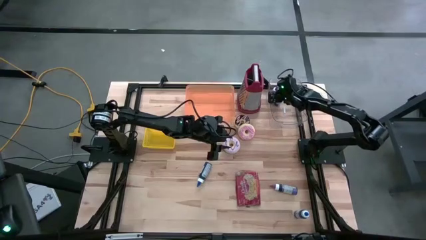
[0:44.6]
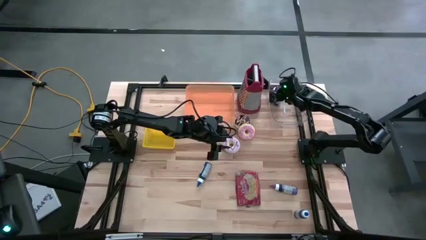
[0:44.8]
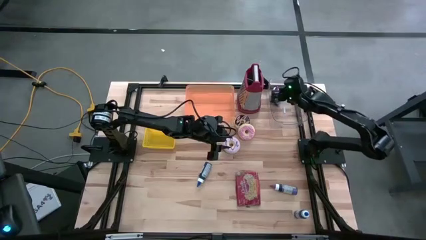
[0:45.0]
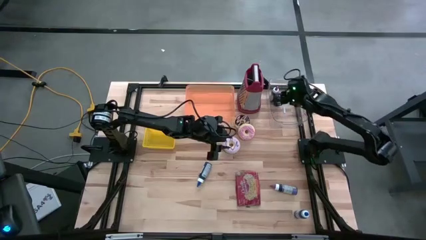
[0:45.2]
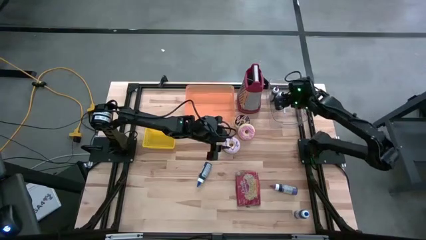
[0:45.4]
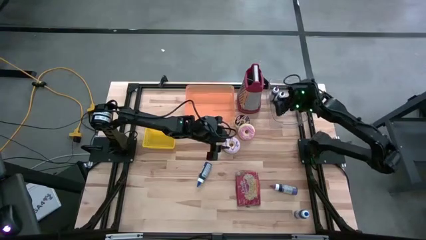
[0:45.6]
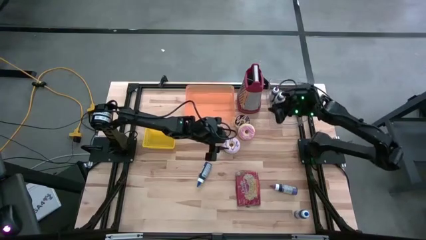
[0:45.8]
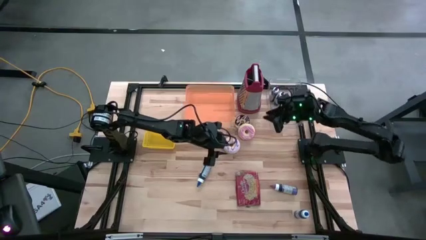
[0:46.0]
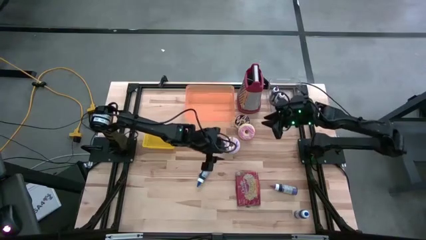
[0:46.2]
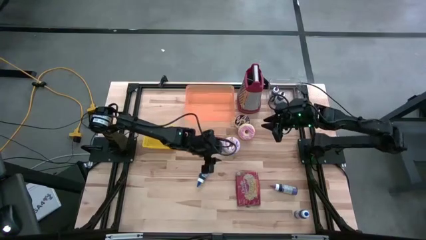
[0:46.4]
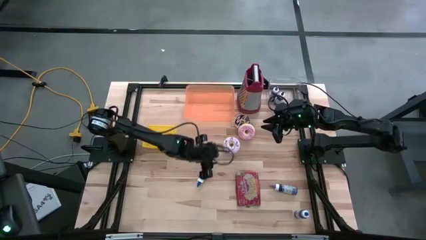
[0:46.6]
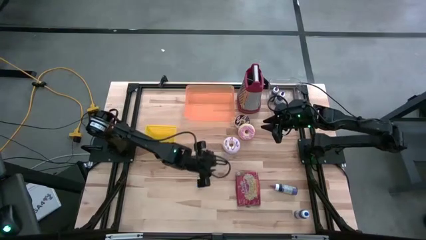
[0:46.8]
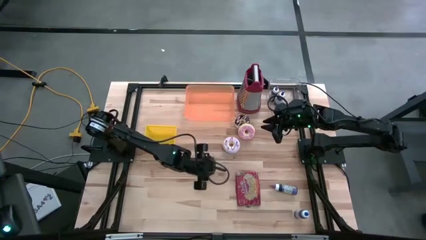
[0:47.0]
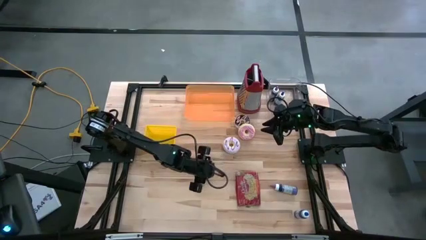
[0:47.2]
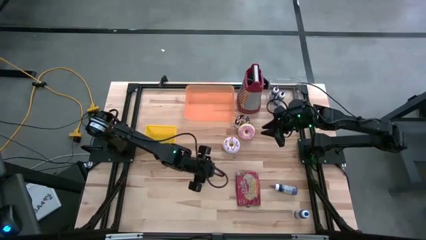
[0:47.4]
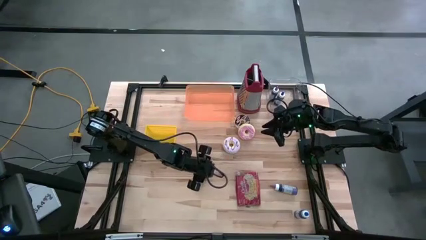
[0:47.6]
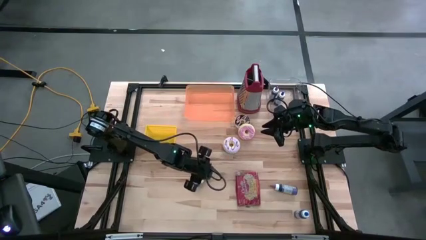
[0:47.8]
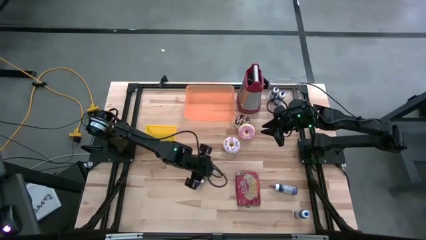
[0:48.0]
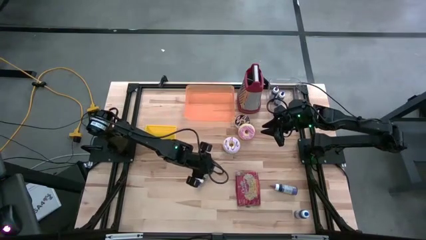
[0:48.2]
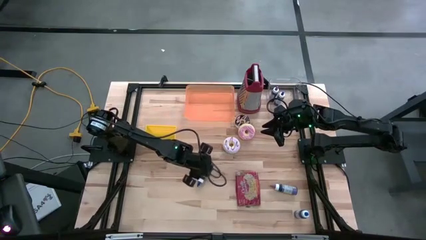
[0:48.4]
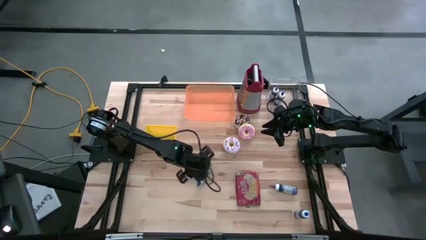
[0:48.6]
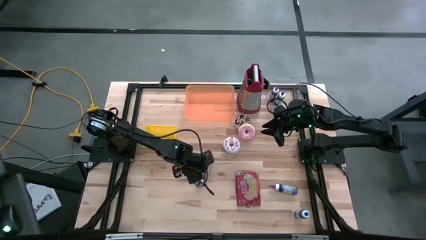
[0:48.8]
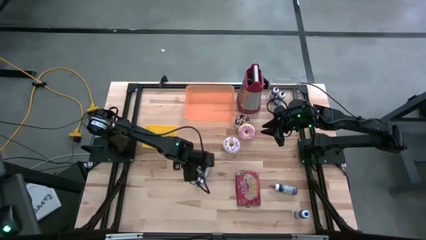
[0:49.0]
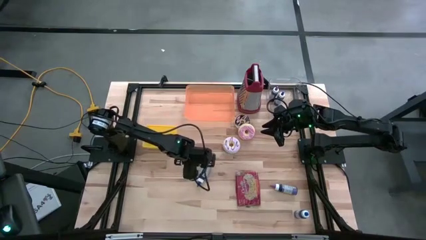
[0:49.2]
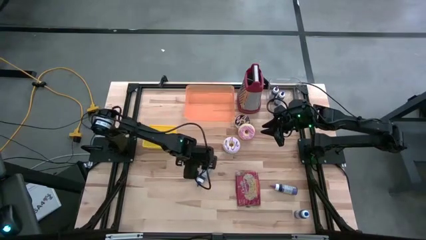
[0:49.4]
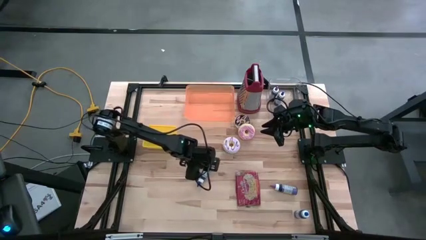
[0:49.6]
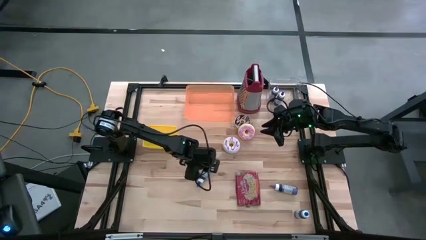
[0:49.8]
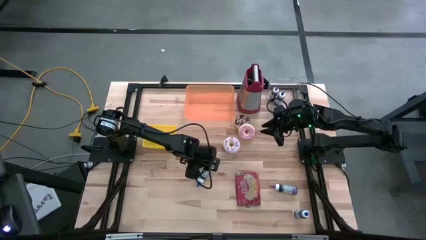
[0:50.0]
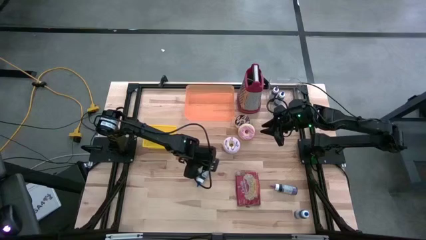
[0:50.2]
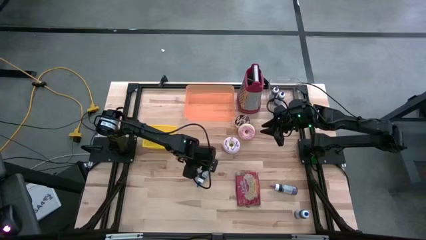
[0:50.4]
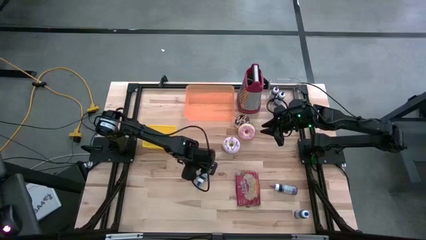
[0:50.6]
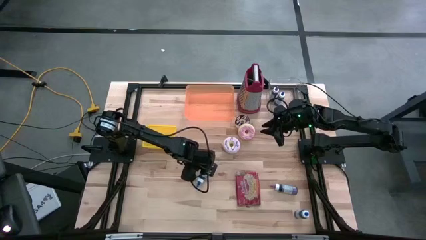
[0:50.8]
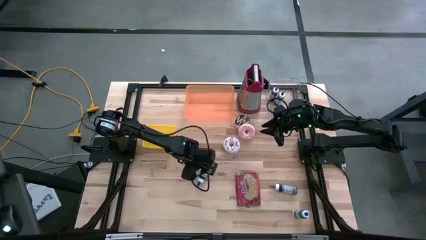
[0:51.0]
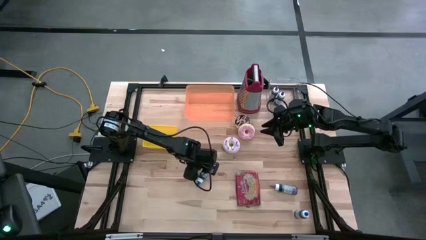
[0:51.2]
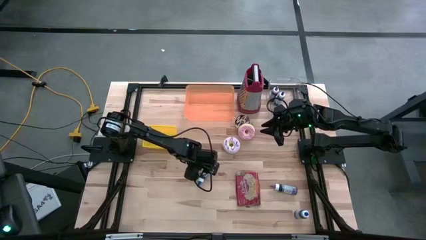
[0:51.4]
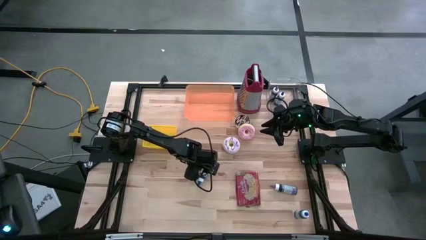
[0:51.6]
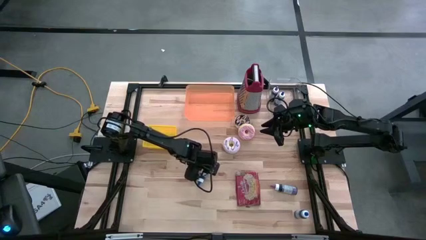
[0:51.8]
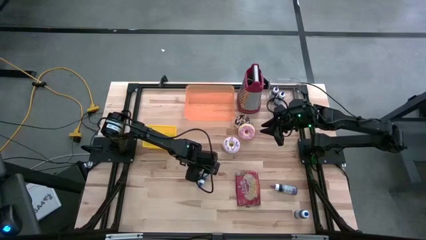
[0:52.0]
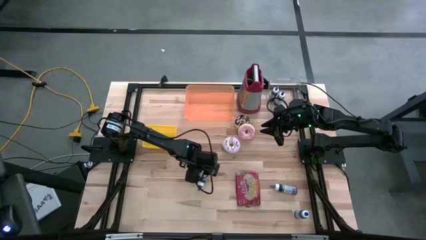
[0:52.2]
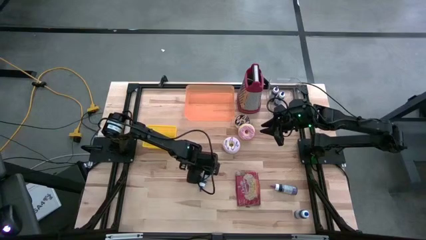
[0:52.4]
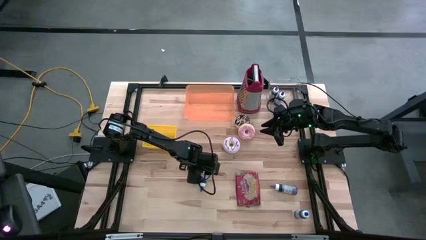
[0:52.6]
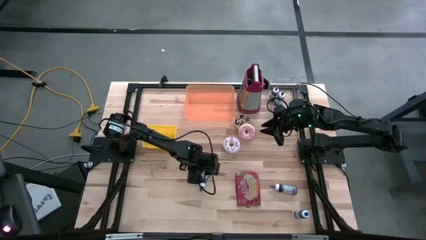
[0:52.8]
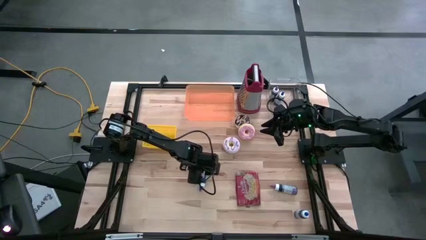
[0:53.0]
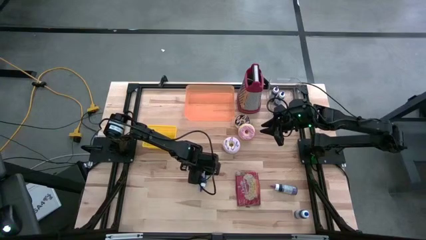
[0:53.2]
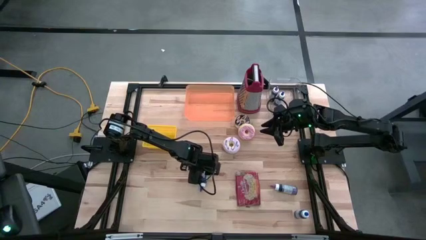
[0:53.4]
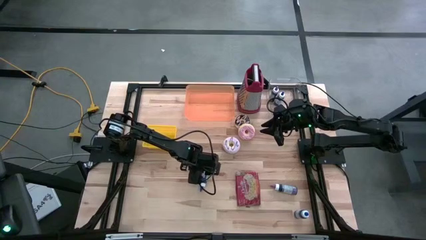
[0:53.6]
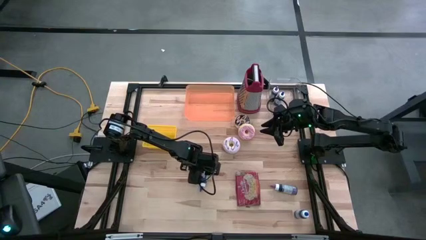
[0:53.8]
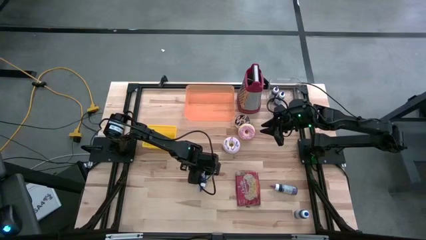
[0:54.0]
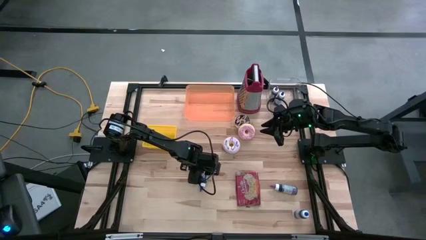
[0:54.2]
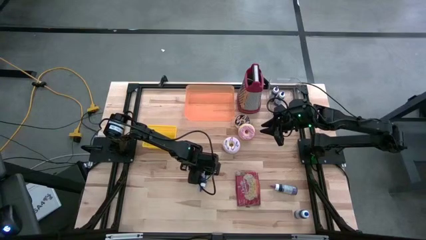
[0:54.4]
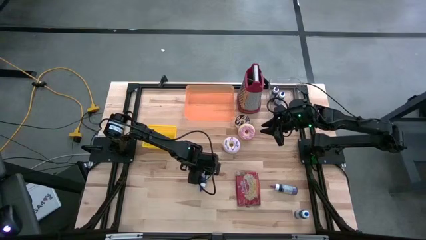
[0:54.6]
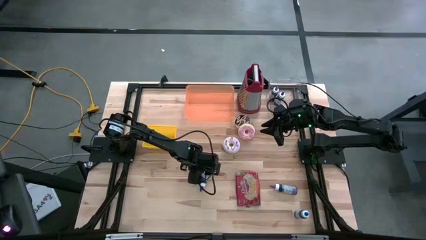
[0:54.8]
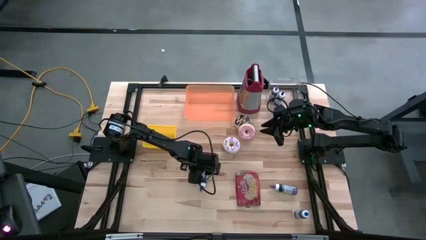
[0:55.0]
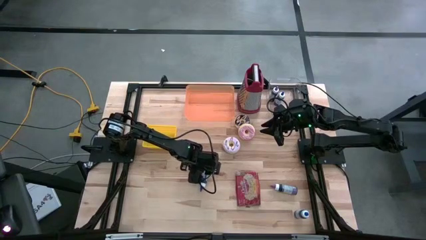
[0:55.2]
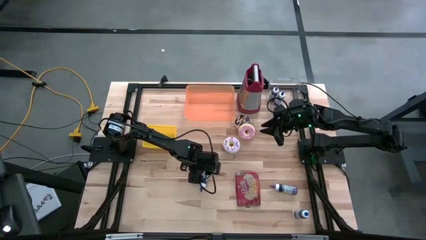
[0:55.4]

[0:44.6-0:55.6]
Task: Pick & Place Food Item
Put the left blue food coloring bottle into the transparent bin

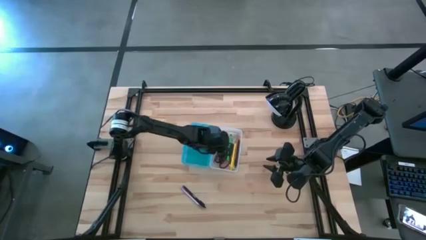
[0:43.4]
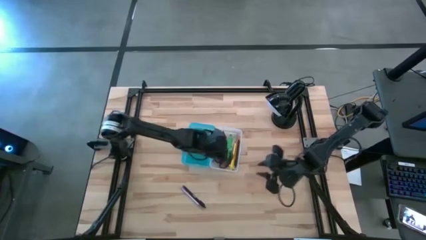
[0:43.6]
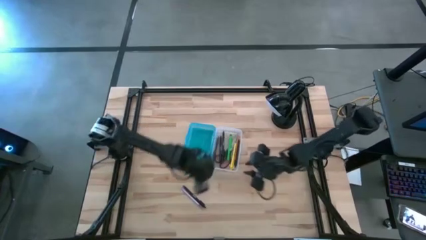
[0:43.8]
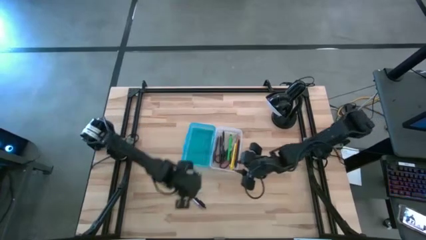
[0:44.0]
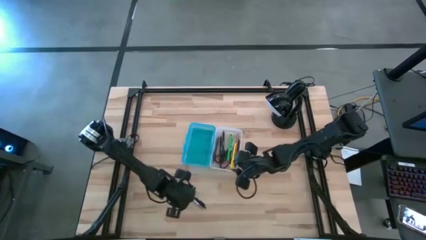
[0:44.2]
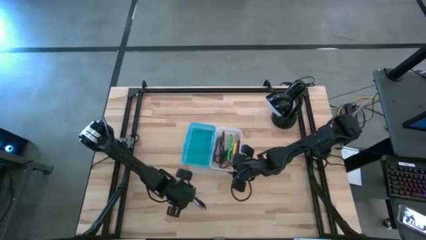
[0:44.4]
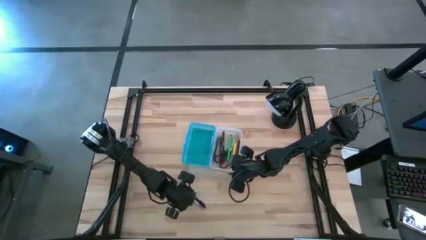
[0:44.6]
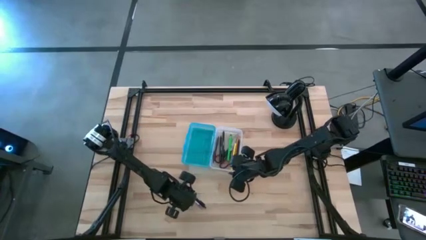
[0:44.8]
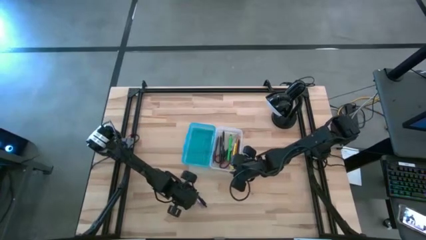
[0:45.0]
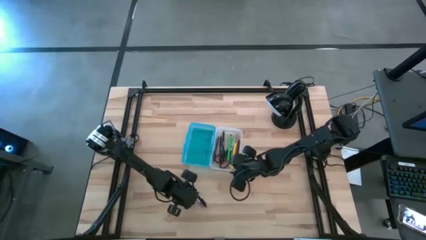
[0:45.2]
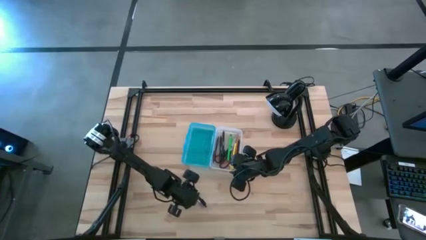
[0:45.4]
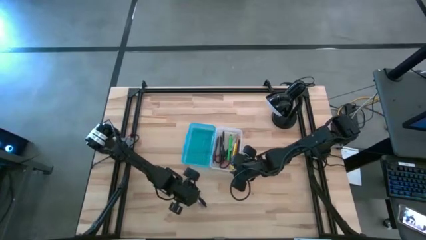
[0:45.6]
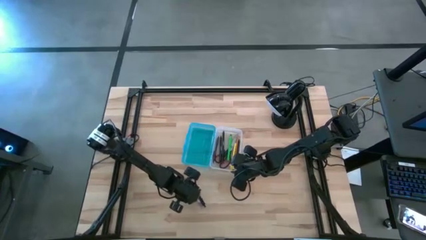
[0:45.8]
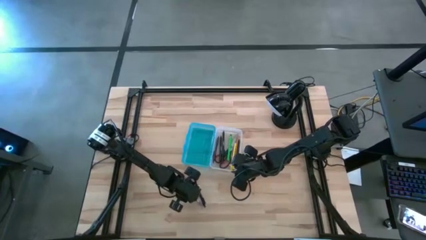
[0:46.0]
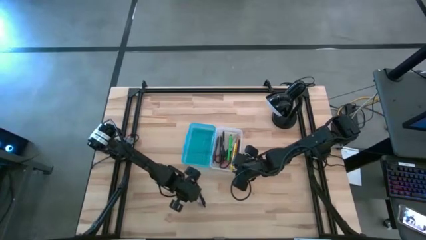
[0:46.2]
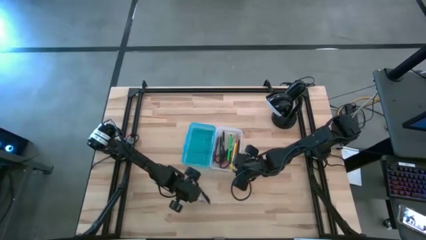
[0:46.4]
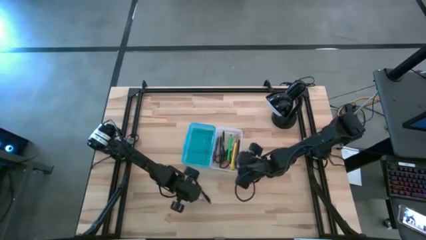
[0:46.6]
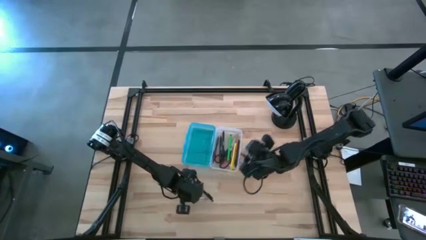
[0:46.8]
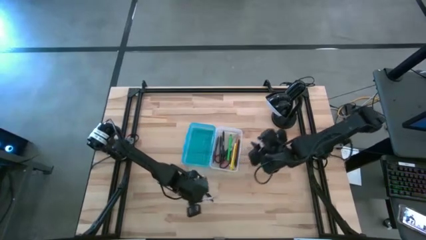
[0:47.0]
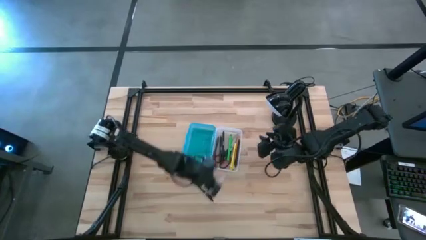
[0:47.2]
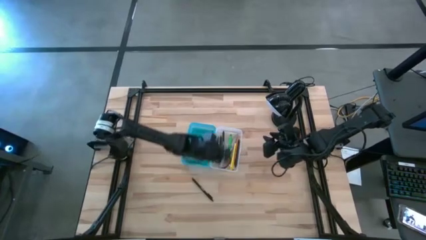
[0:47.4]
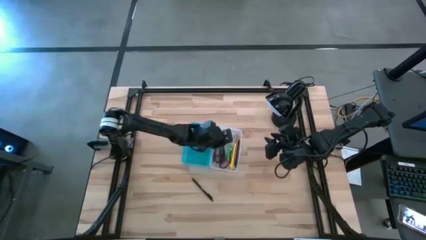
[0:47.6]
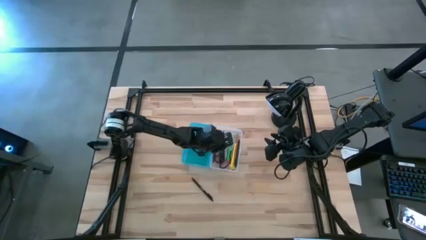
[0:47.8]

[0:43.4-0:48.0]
Task: Pick & place school supplies into a supply box
Put the purple pen into the supply box

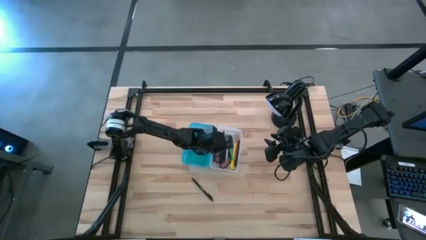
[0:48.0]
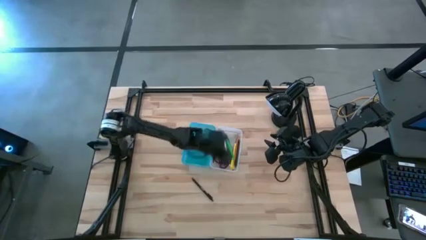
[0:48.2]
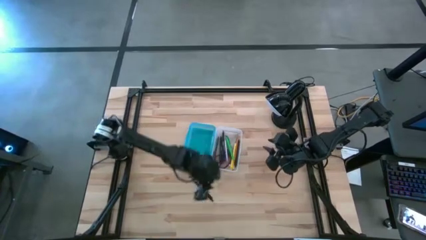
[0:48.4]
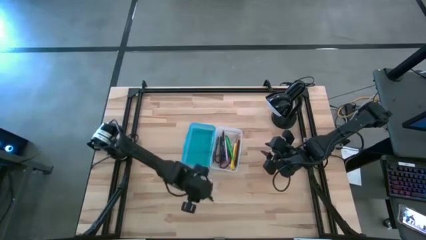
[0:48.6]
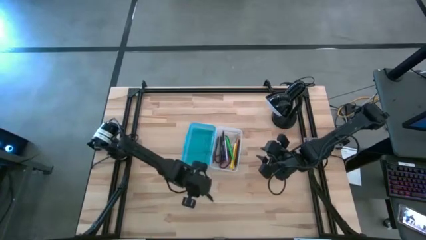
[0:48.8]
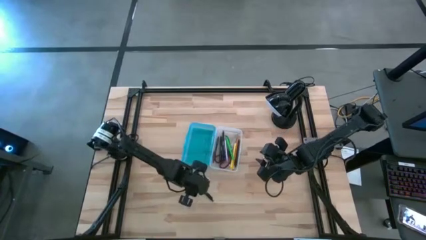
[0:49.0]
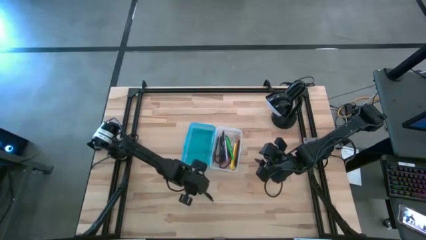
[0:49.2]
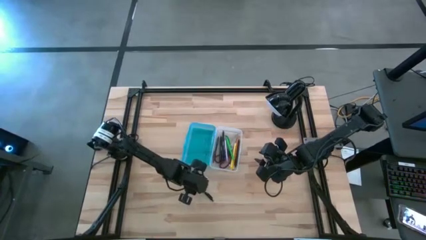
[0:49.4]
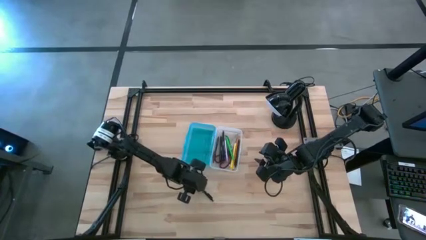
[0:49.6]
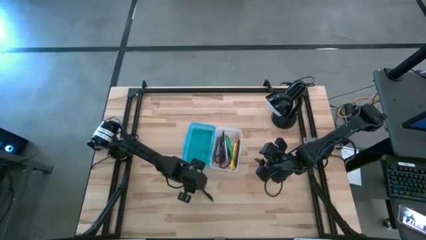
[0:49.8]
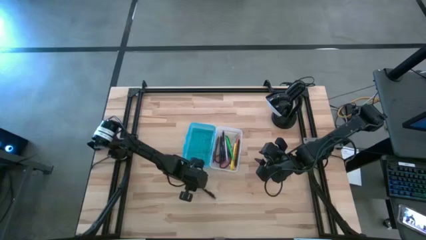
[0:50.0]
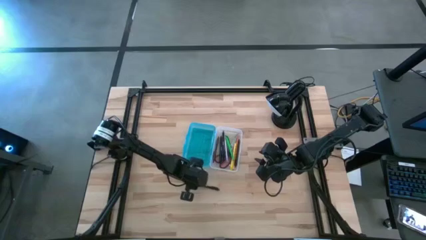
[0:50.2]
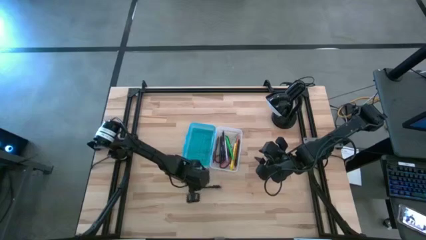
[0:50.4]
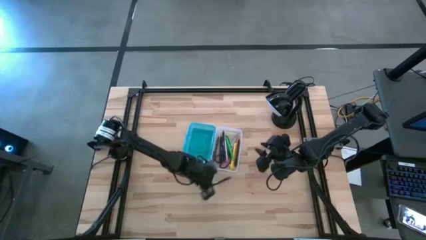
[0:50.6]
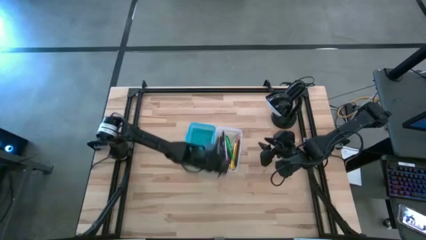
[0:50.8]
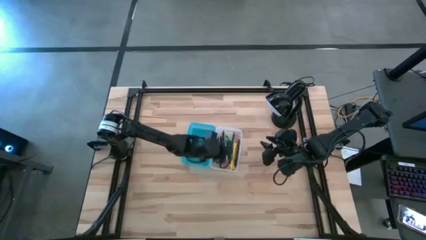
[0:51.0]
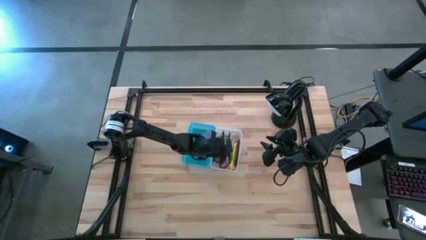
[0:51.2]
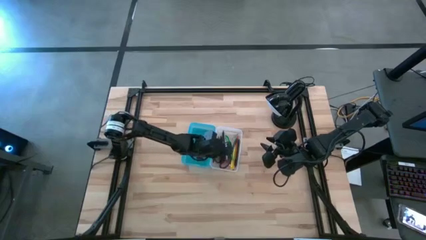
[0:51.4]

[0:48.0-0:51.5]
Put the black pen into the supply box
